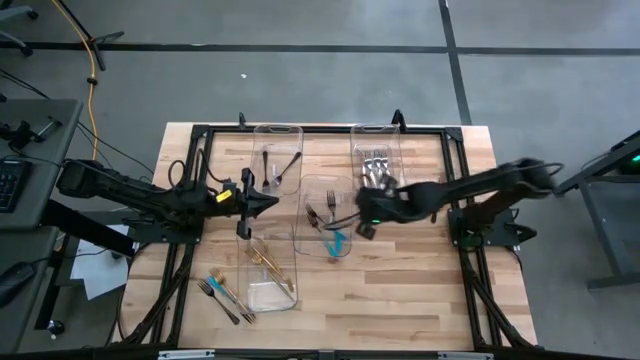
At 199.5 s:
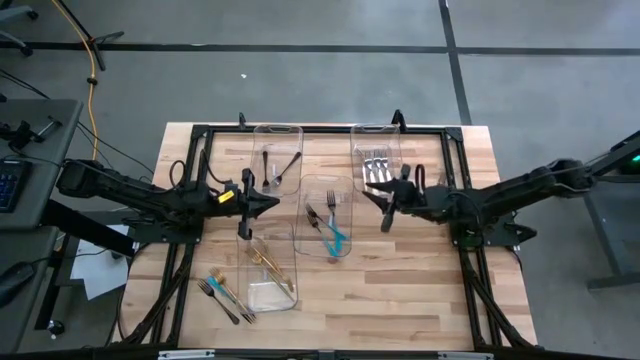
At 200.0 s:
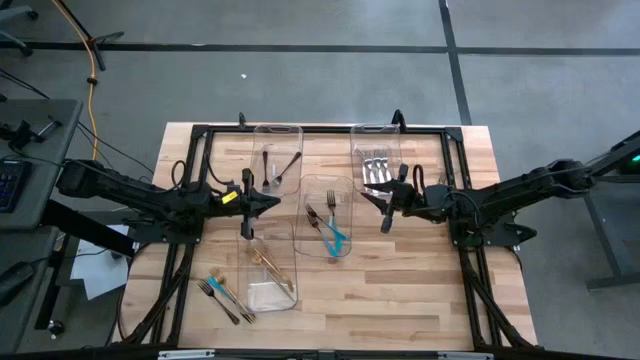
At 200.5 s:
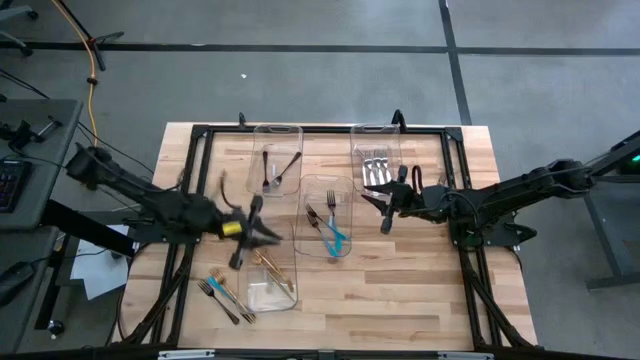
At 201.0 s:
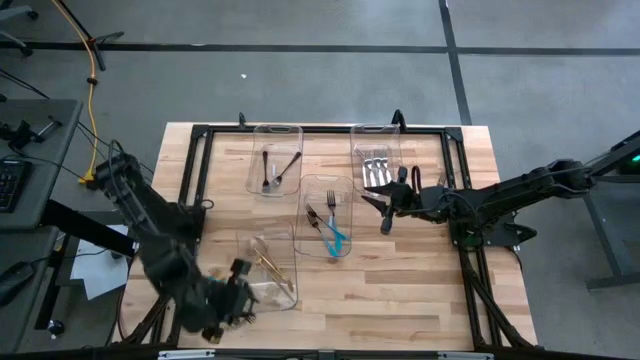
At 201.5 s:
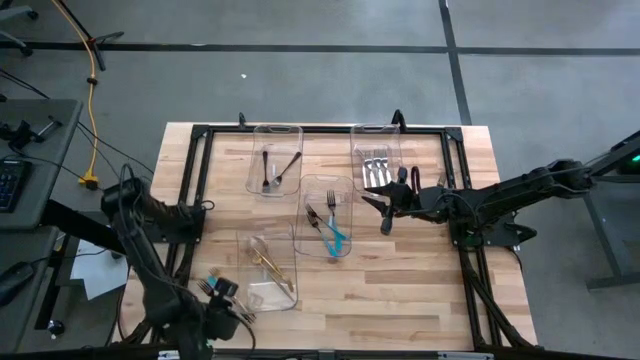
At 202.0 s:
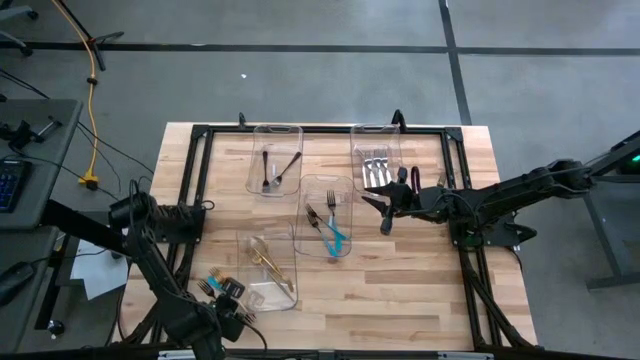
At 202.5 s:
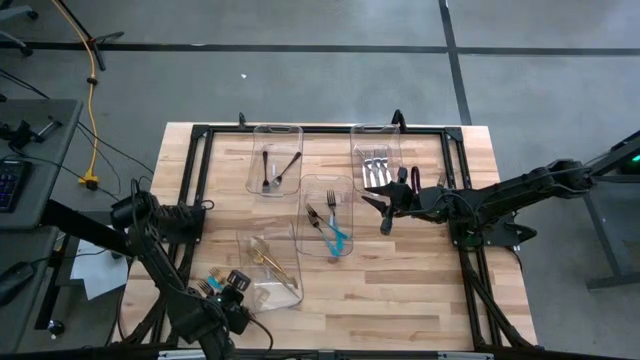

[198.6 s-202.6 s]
Task: Sort silverware by color (type)
Adjust the bottom left transparent bin on the table

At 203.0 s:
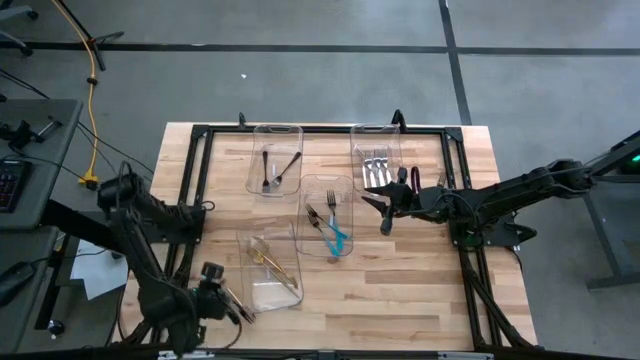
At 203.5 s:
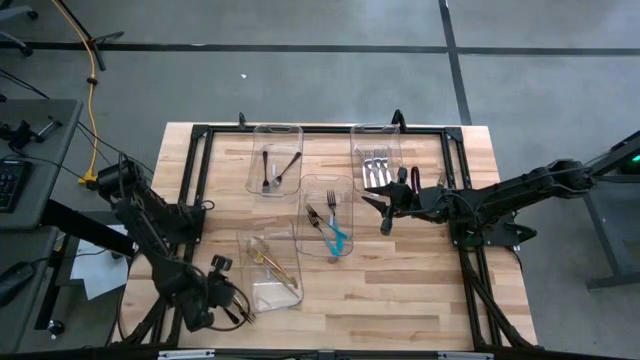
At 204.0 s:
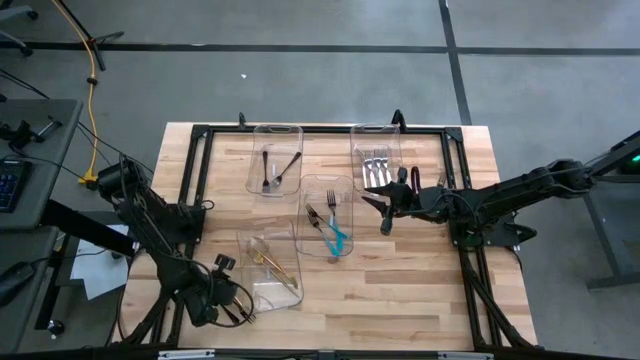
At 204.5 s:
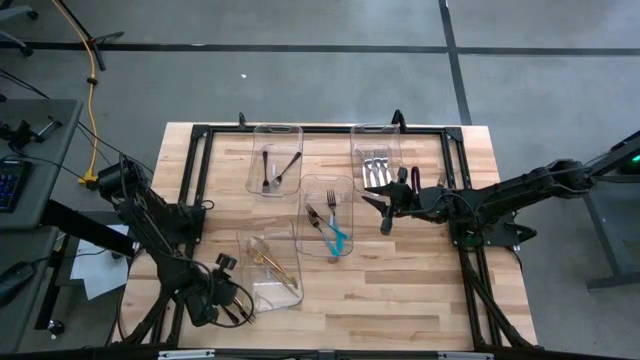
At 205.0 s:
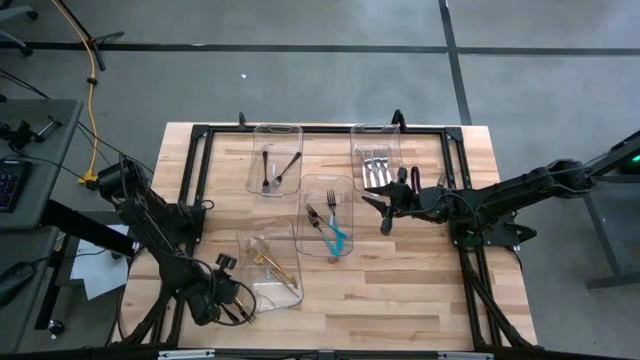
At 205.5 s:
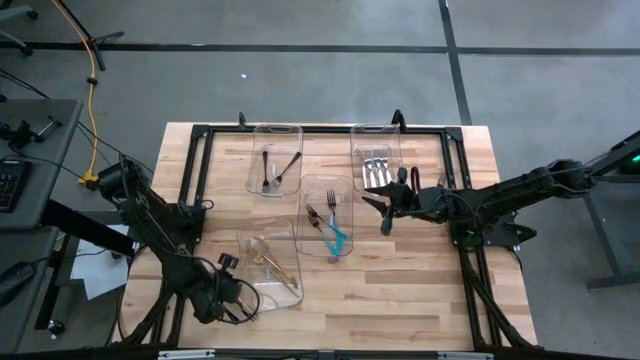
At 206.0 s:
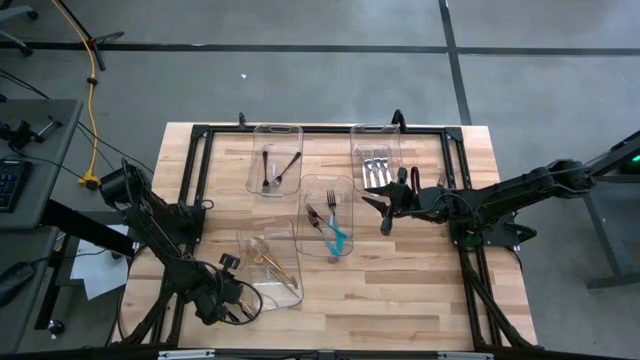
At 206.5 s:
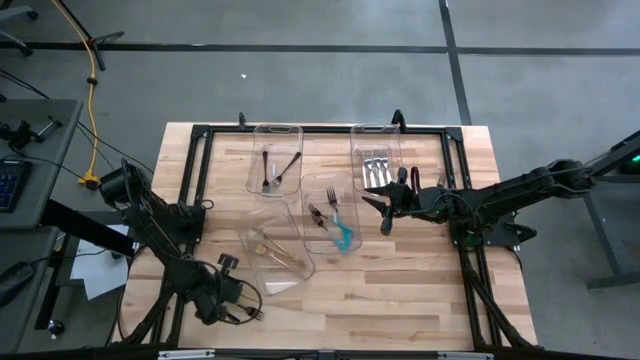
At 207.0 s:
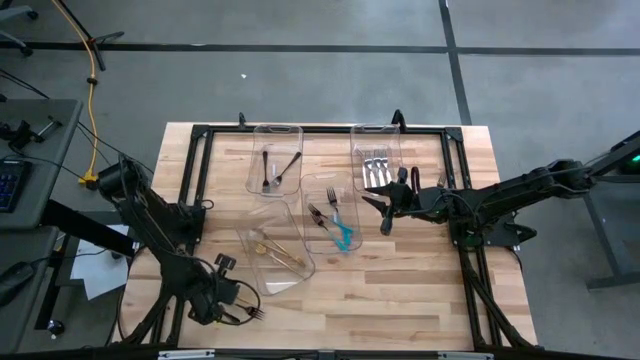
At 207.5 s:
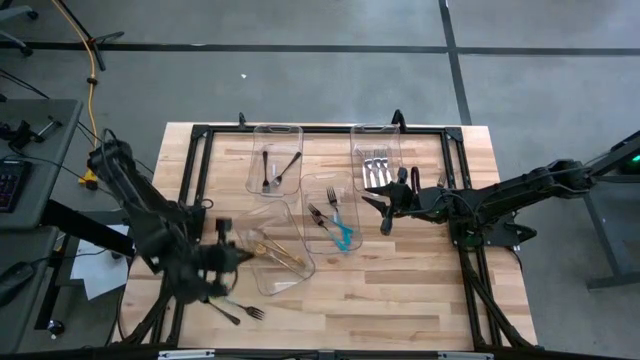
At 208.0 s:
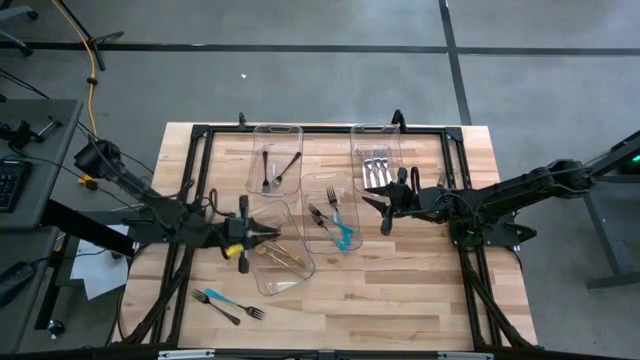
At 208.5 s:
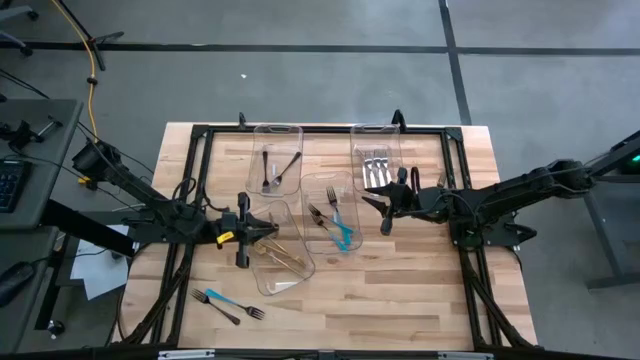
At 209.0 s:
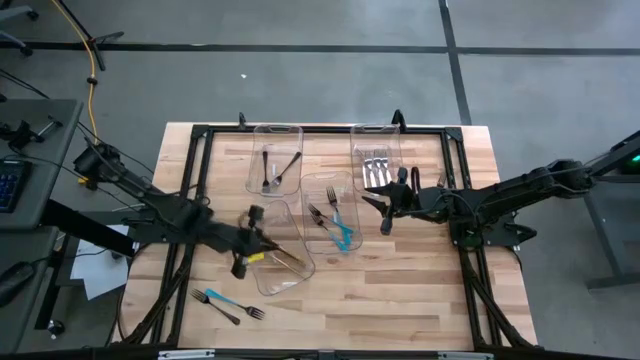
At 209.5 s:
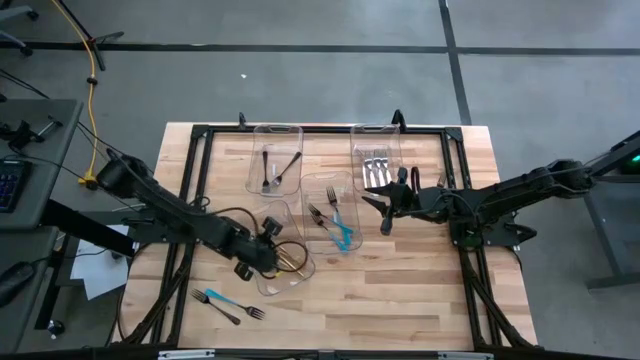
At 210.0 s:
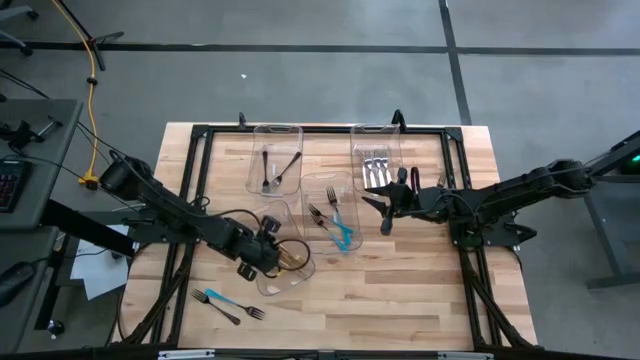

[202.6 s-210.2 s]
Put the gold fork into the bottom left transparent bin

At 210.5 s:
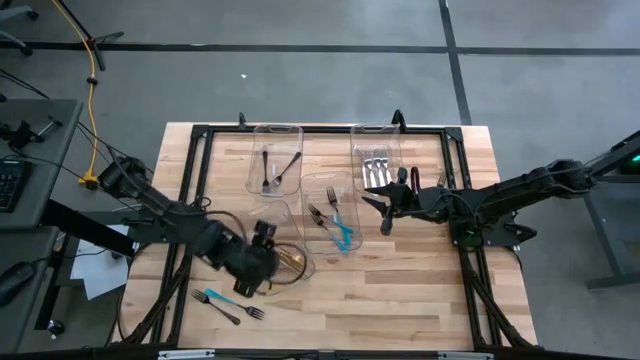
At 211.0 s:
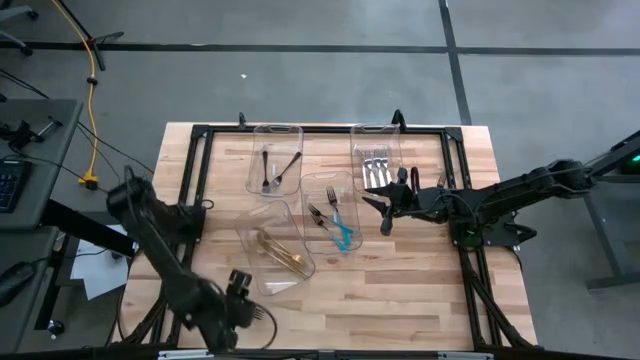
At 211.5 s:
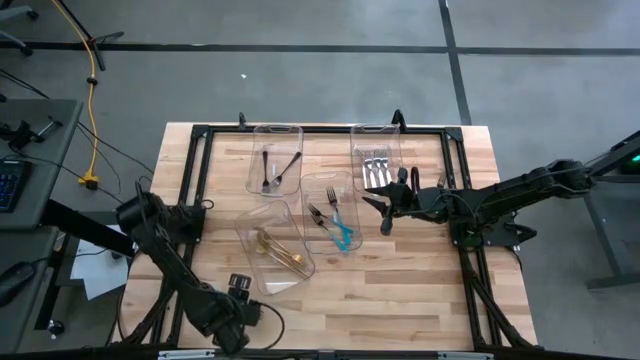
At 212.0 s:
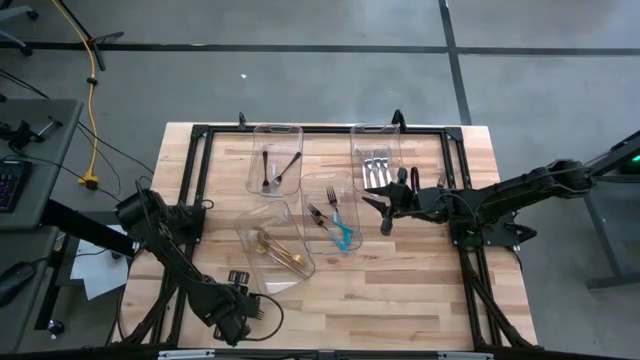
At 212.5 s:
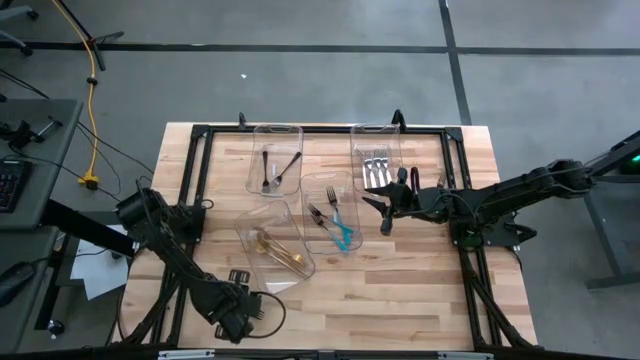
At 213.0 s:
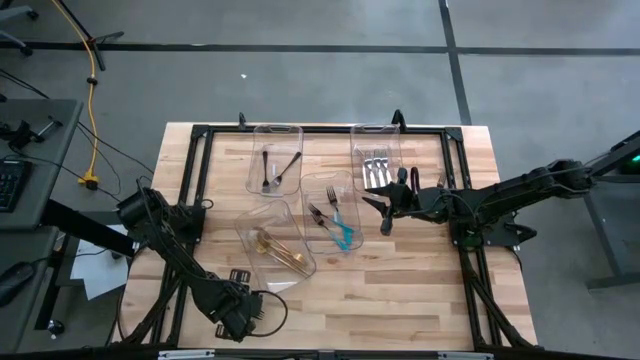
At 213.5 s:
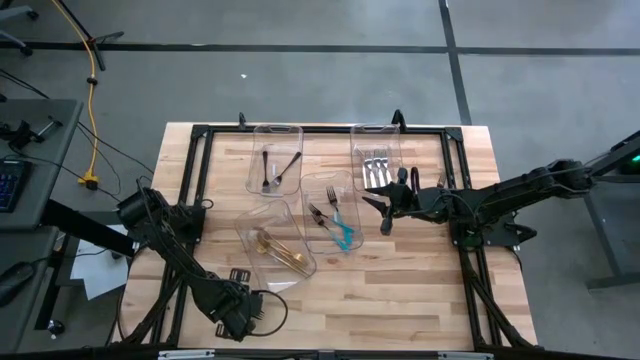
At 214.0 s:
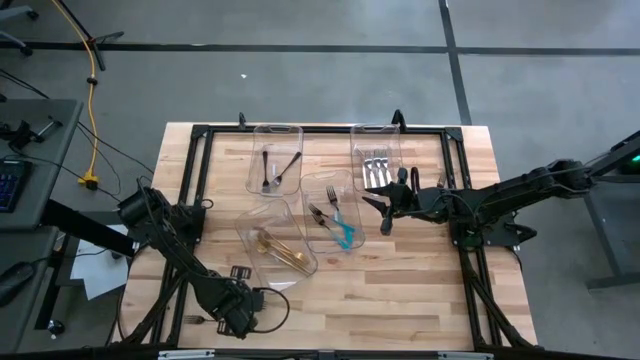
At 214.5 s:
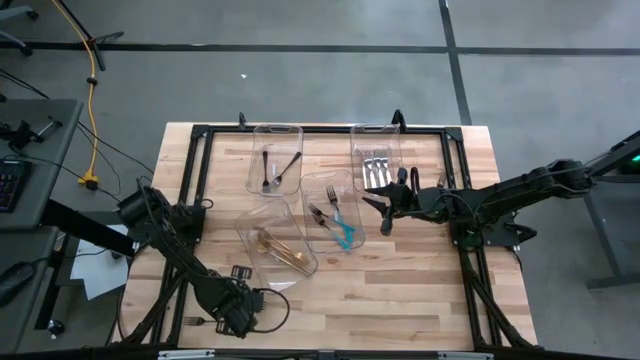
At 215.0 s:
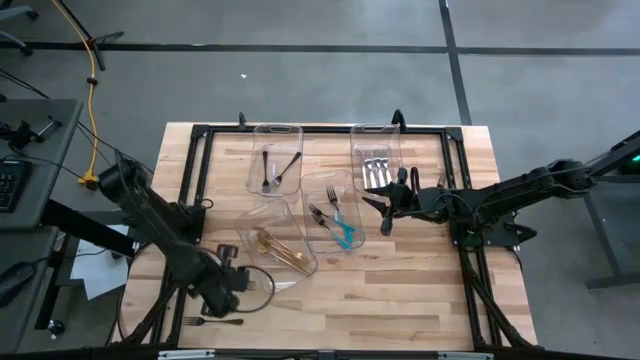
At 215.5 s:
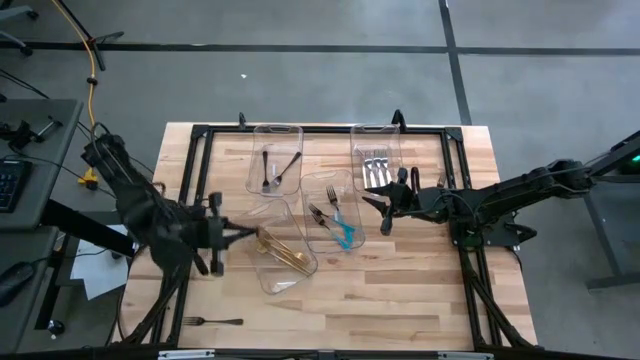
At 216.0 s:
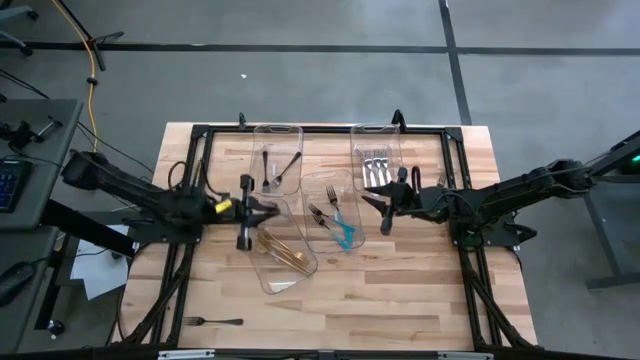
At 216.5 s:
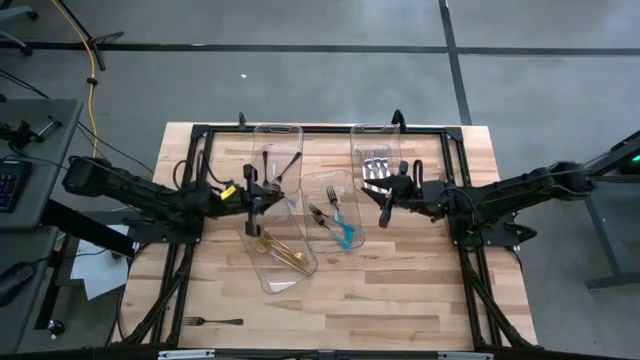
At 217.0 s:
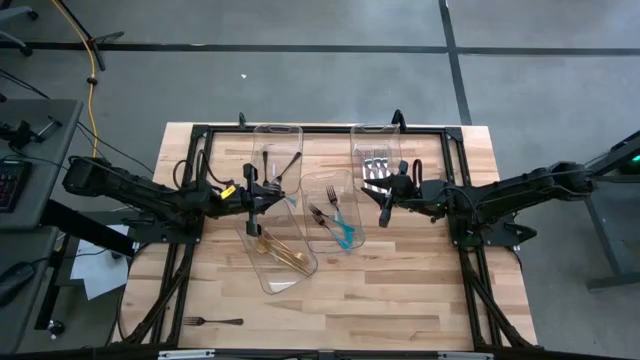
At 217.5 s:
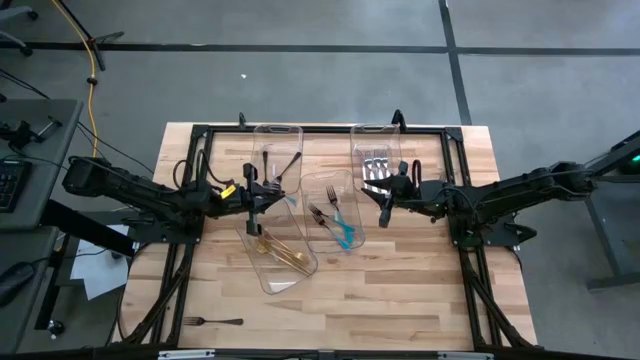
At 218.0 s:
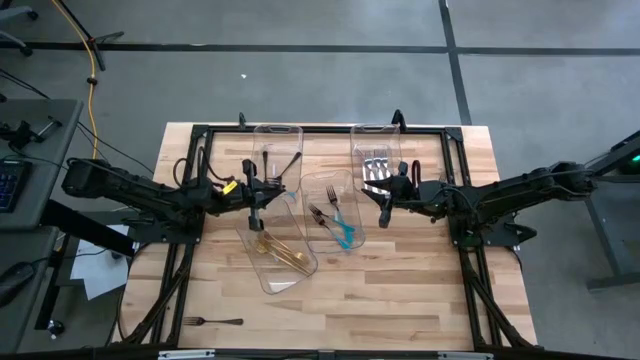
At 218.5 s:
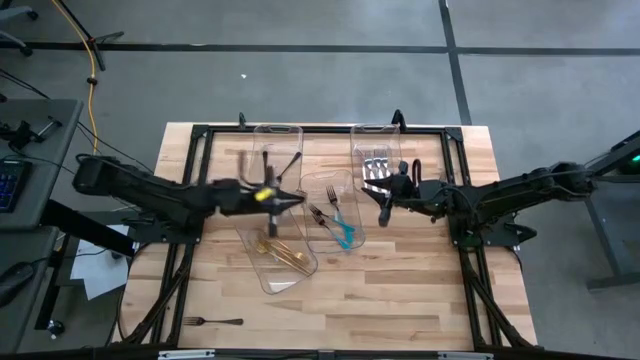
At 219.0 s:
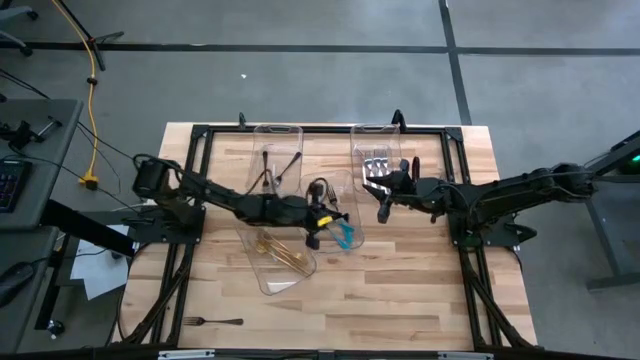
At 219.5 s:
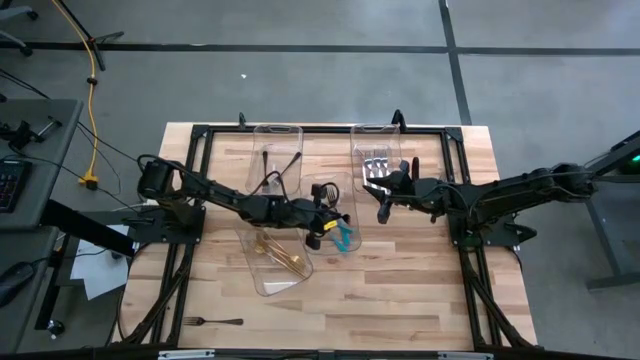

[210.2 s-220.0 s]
Put the blue fork into the center transparent bin
